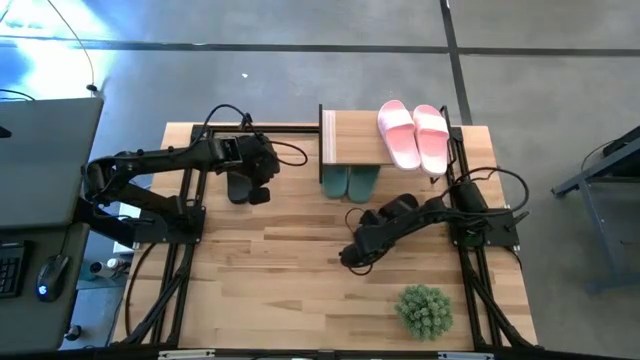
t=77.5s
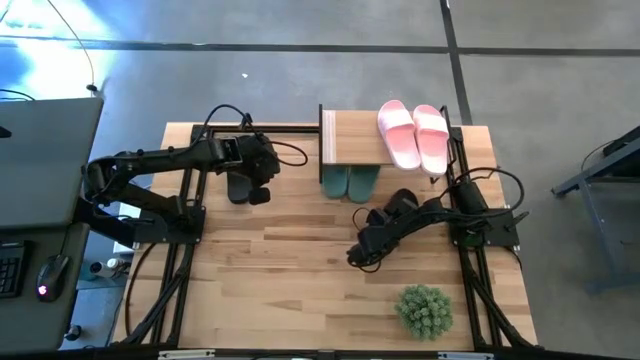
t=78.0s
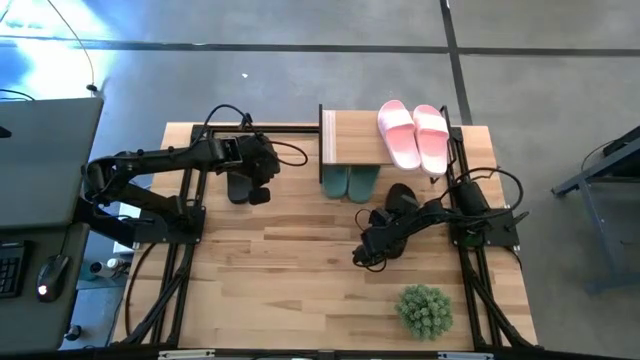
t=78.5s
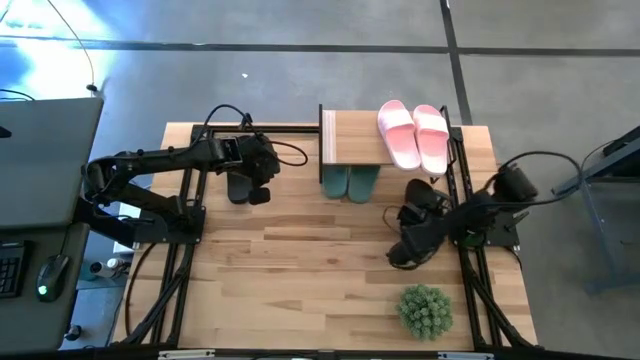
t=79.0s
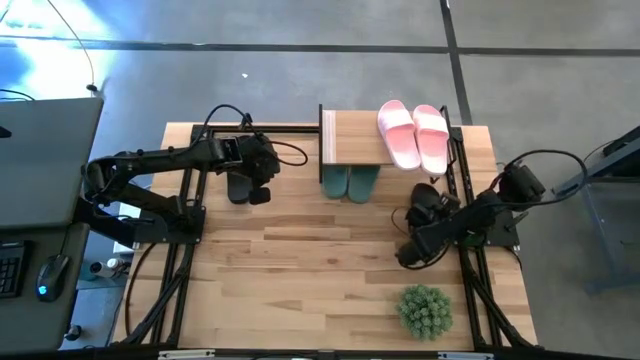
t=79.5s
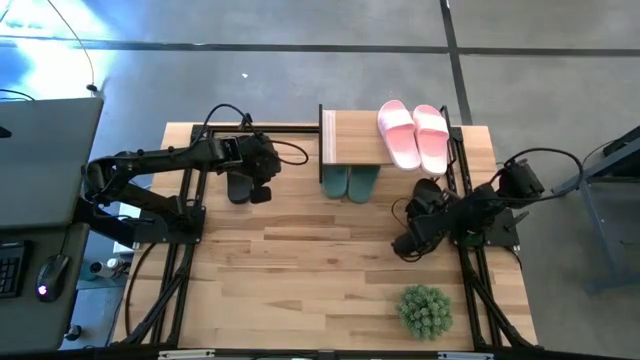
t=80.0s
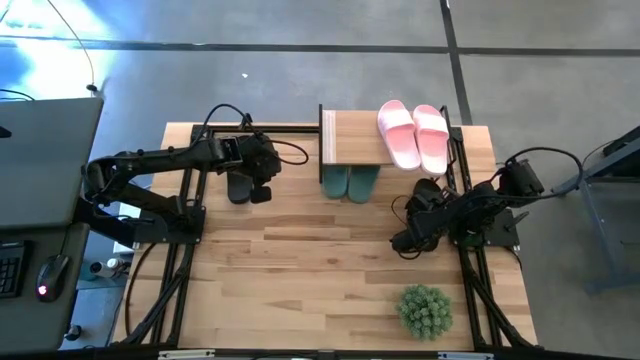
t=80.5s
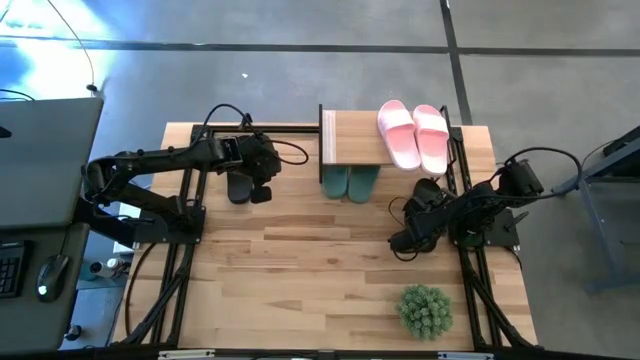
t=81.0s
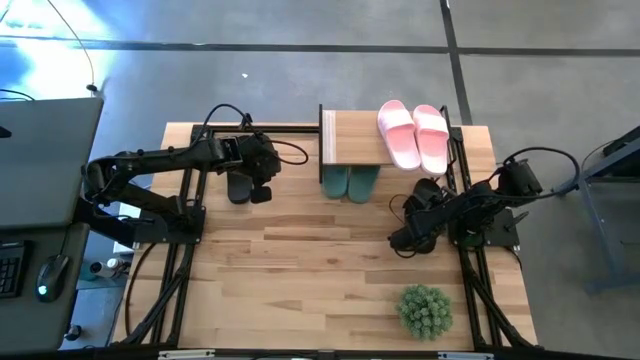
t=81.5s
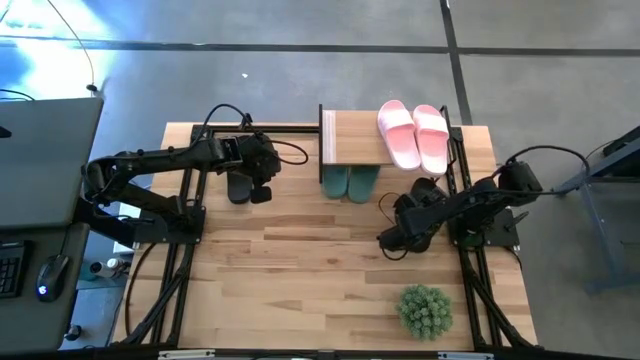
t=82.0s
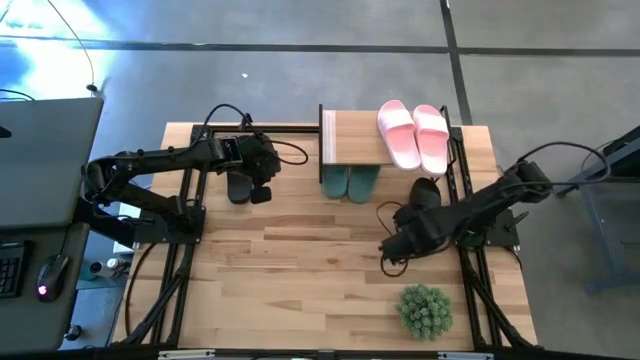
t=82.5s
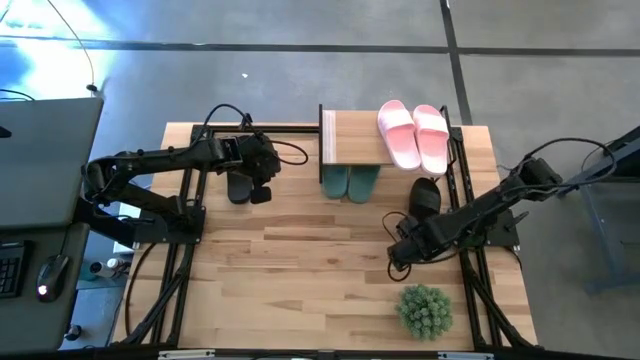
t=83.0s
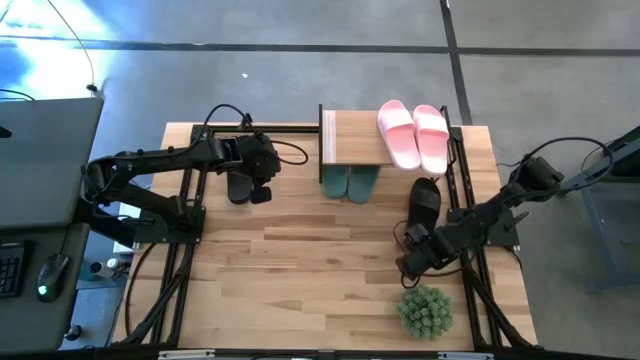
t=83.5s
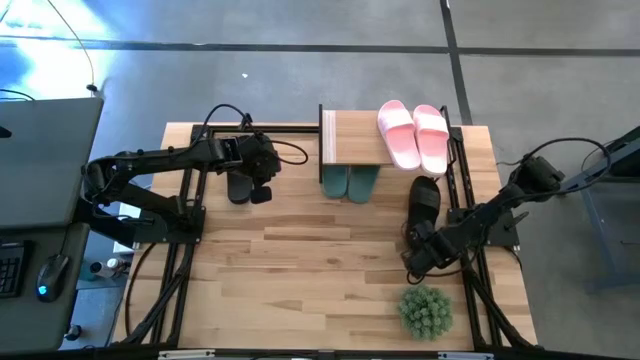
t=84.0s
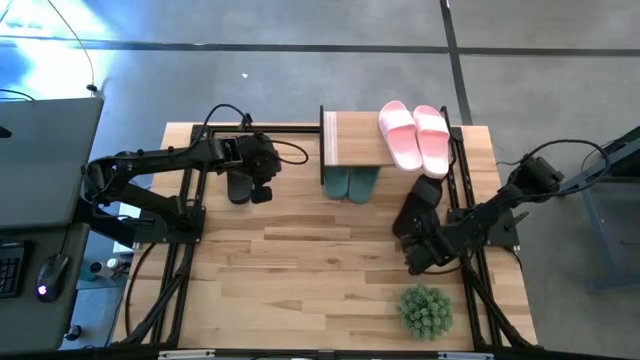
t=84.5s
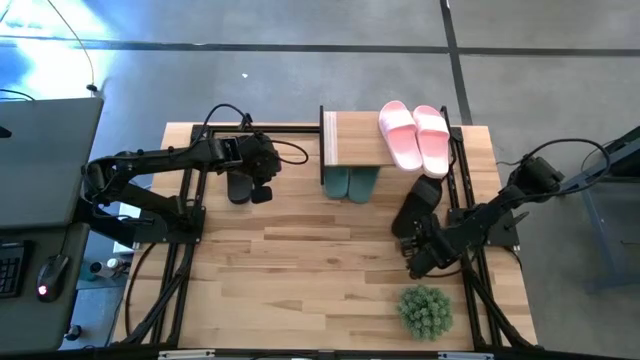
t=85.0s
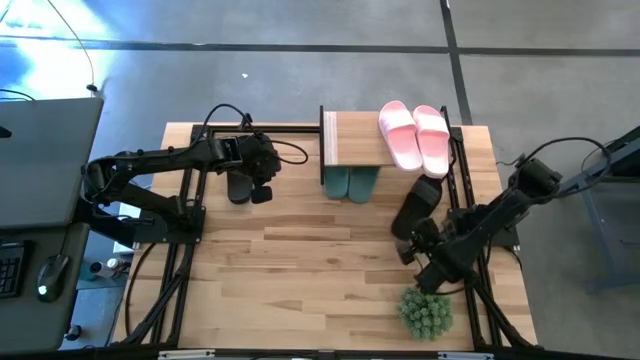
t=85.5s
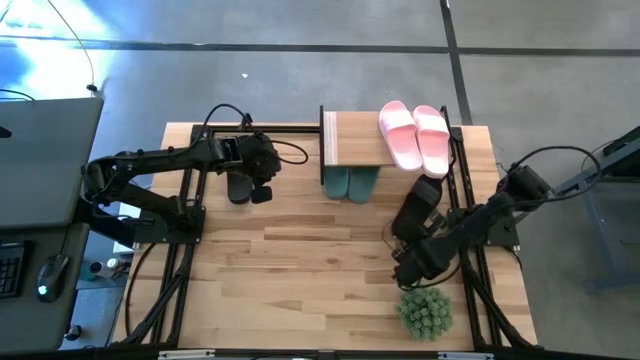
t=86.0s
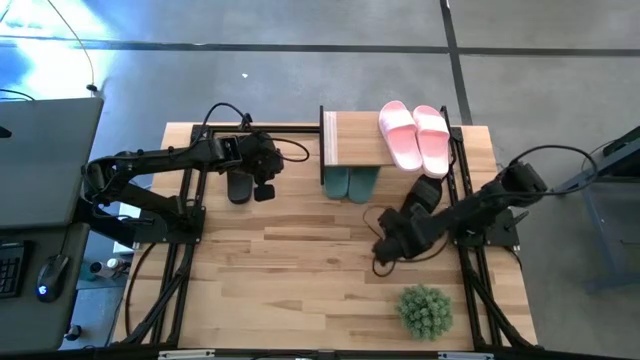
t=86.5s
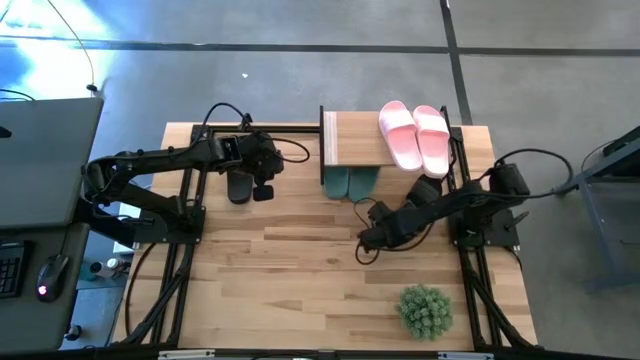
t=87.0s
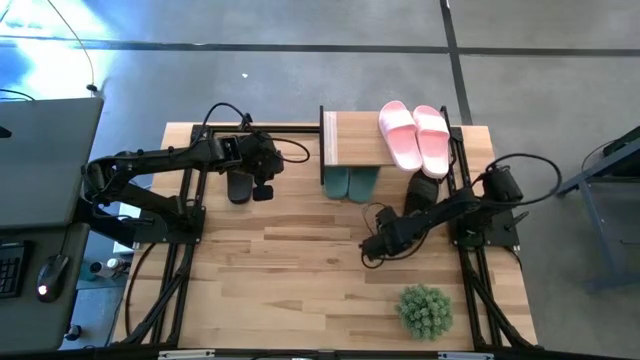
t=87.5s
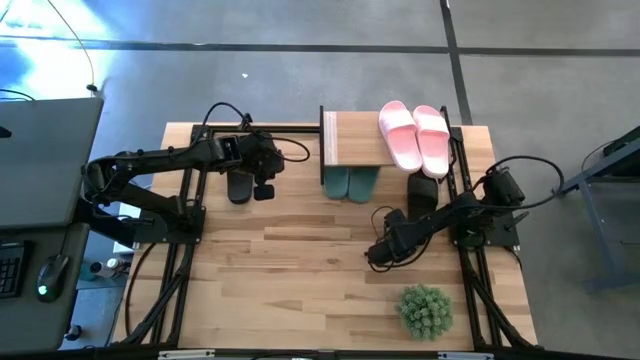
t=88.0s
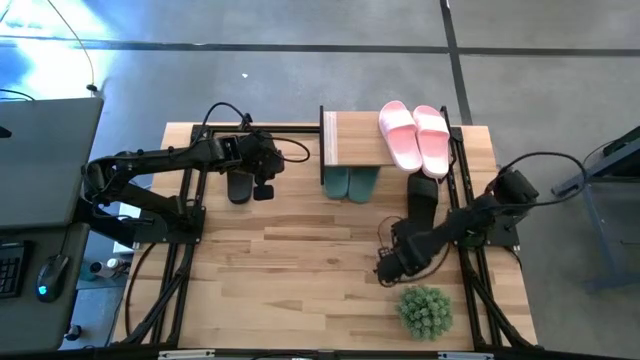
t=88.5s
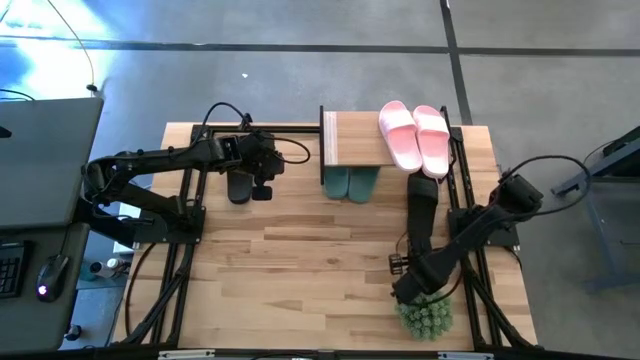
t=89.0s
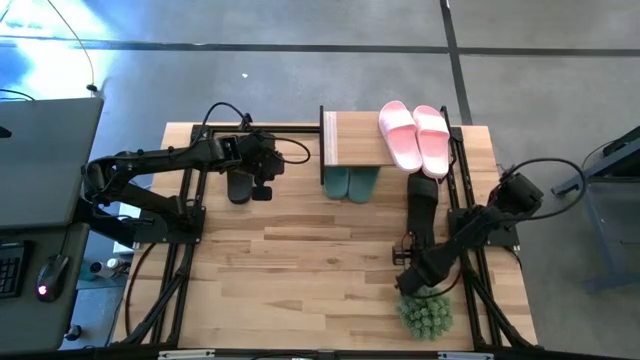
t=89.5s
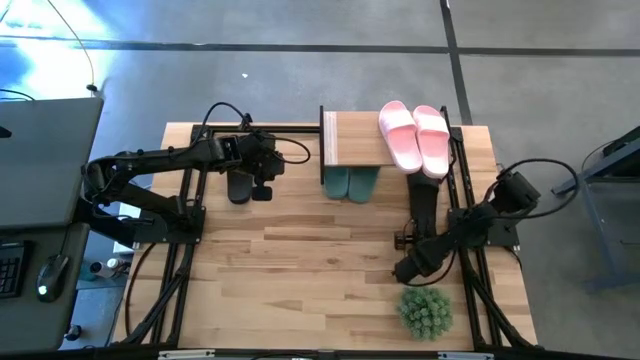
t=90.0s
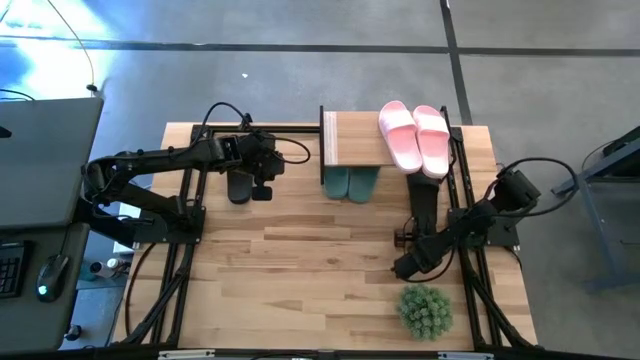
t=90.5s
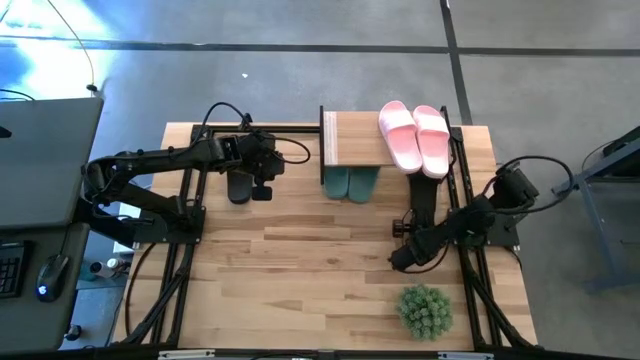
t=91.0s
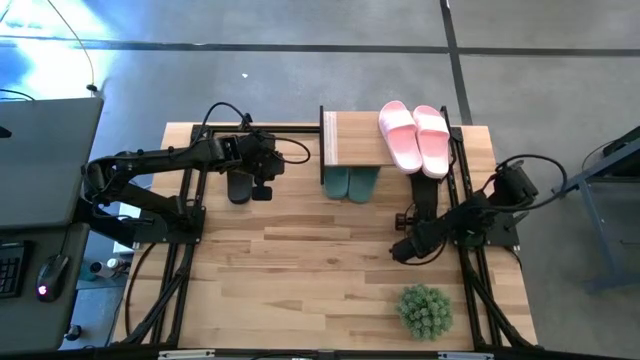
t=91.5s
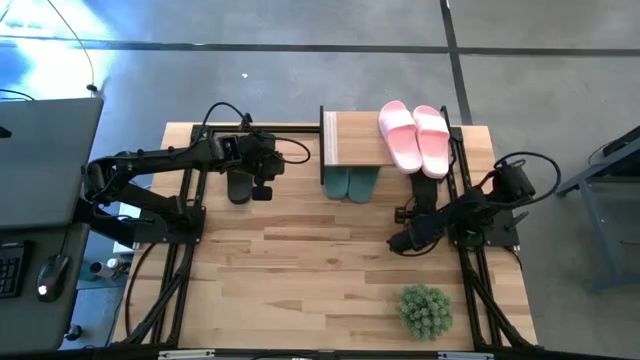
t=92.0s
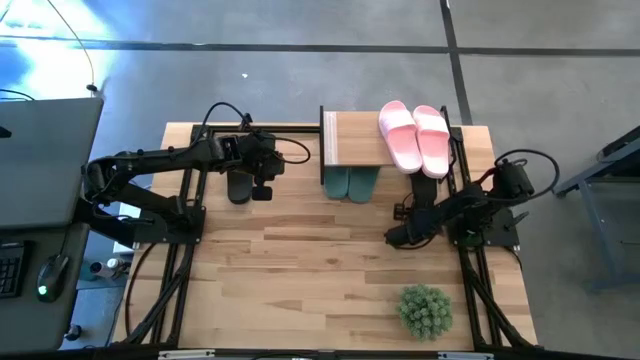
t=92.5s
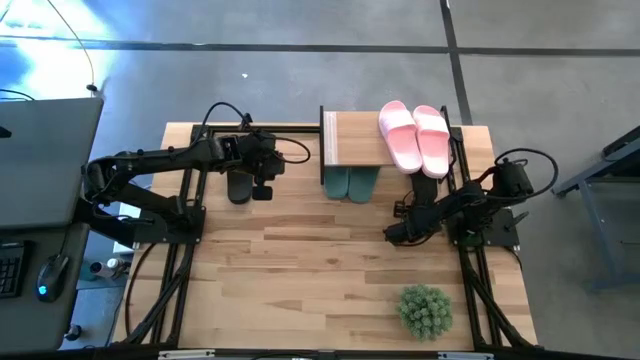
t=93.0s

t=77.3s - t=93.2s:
Task: Pick and place slides into the shelf
Put the right black slipper under the shelf
